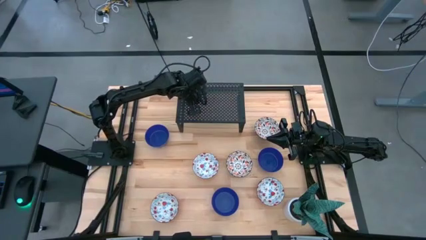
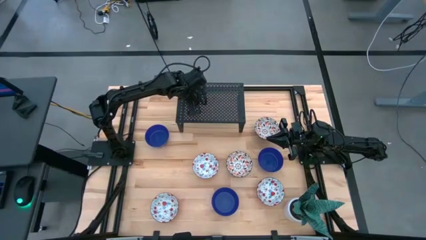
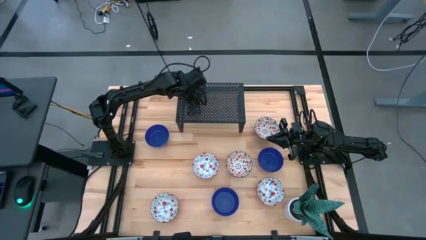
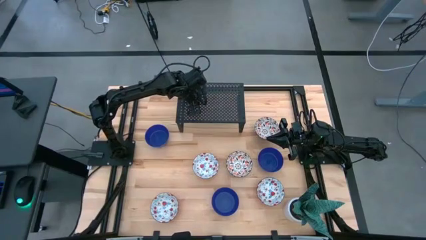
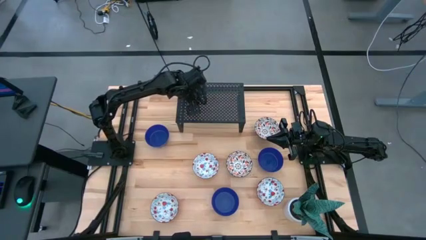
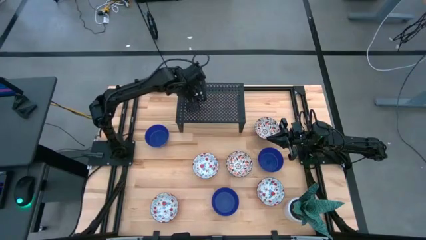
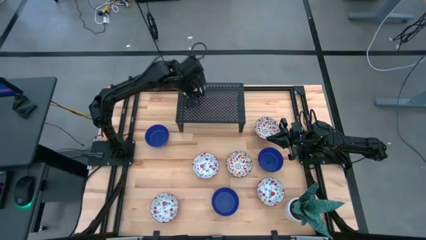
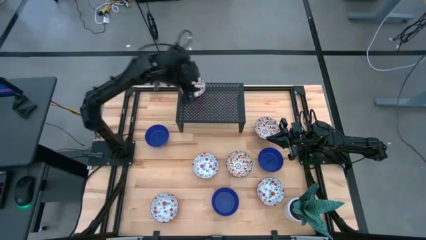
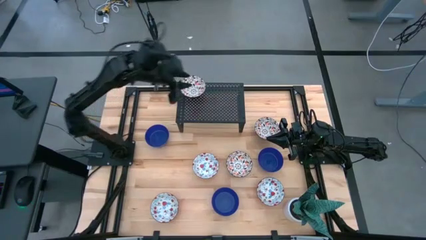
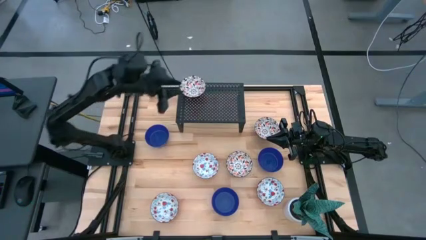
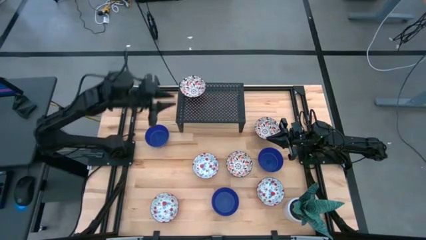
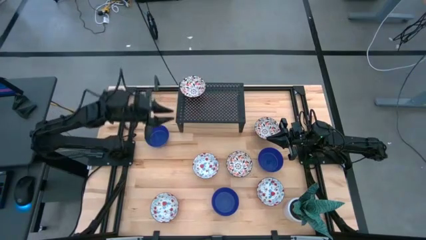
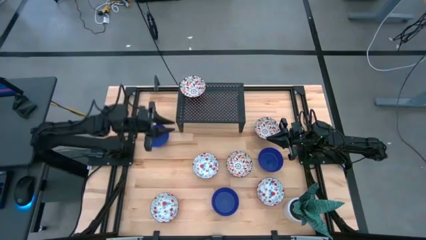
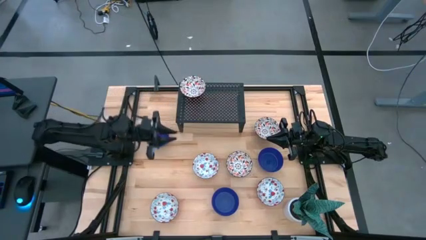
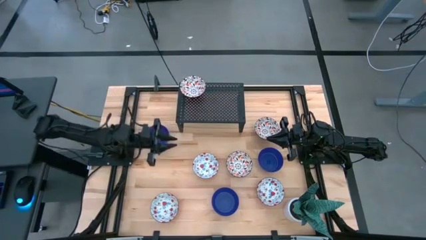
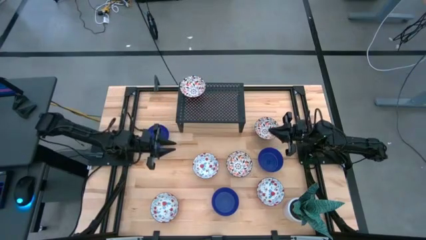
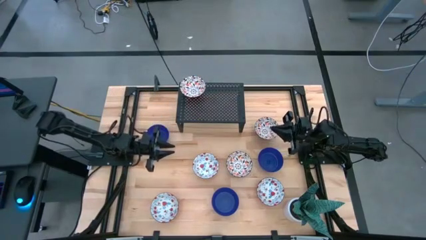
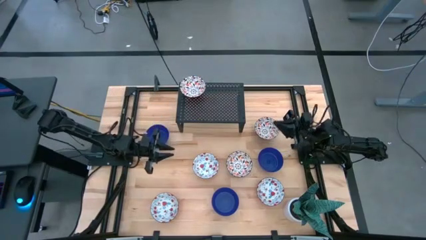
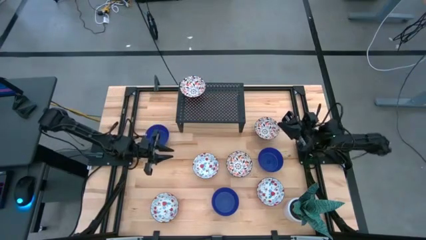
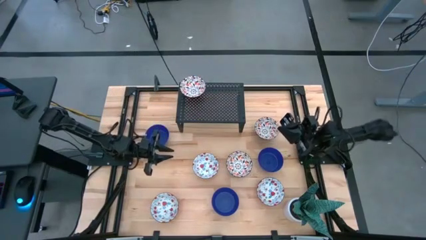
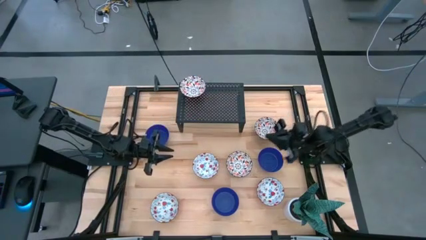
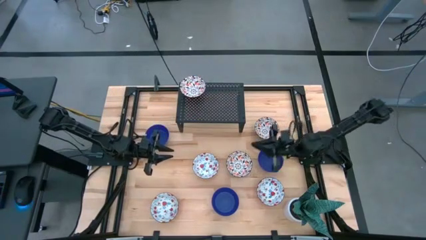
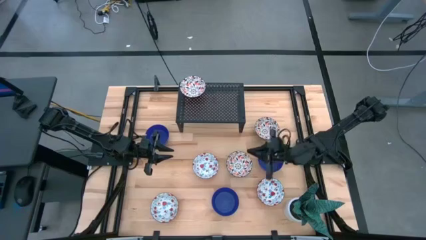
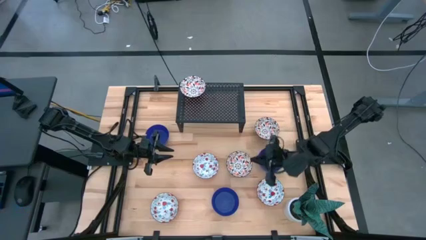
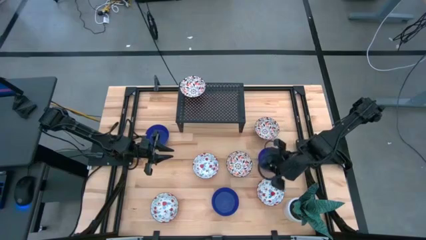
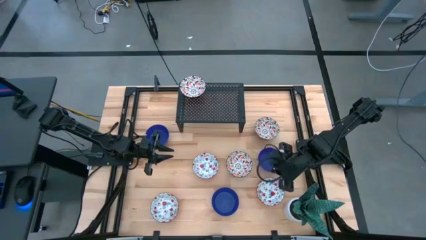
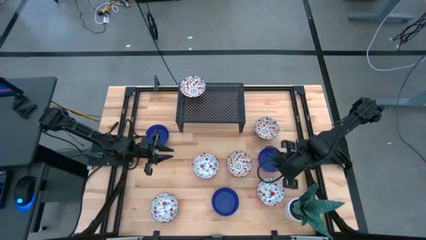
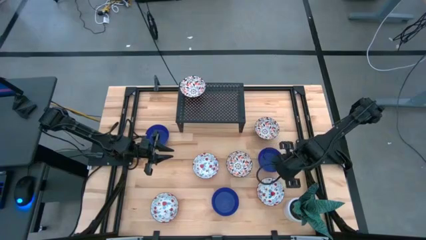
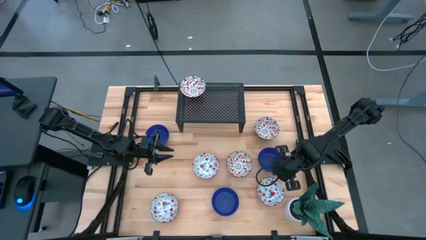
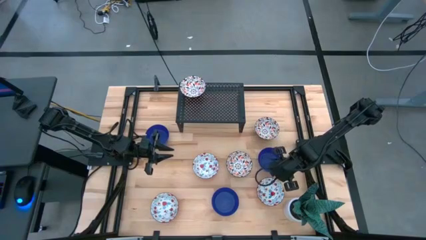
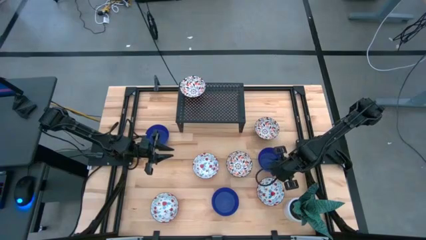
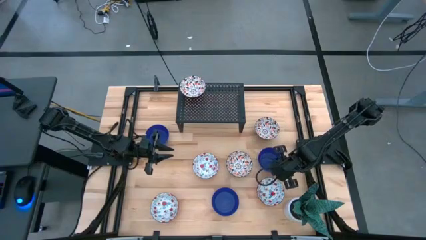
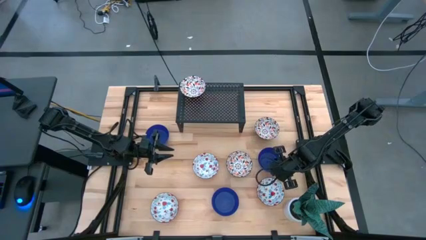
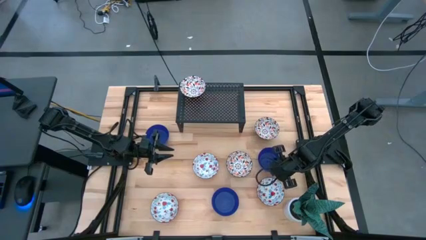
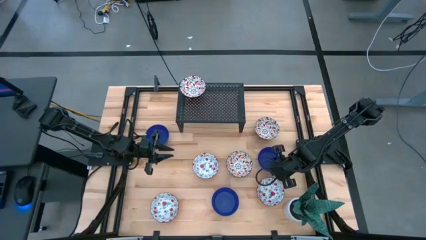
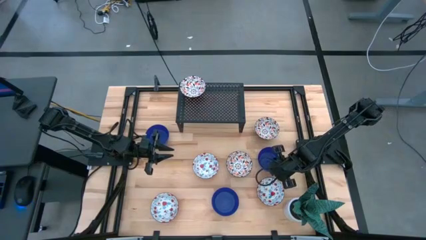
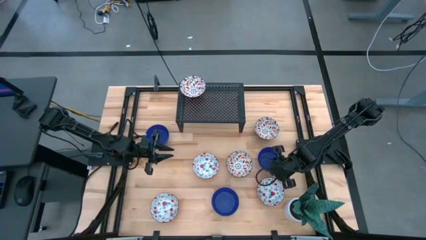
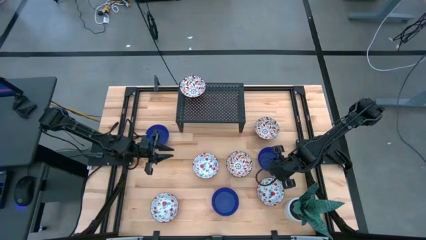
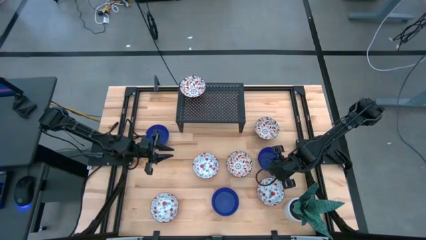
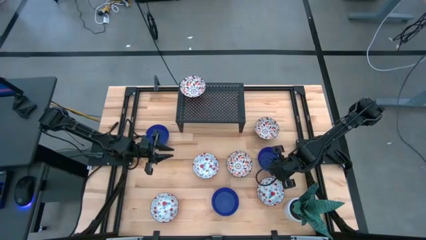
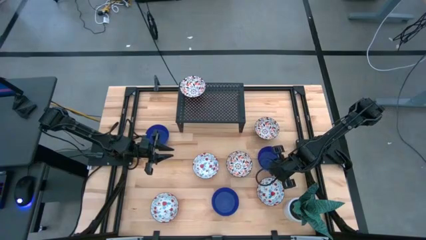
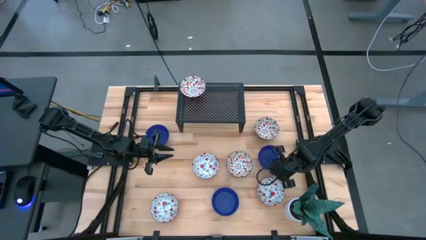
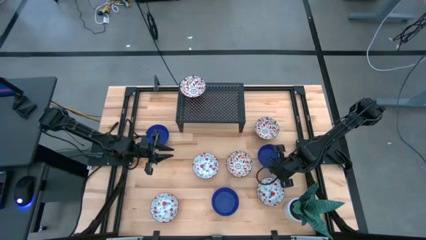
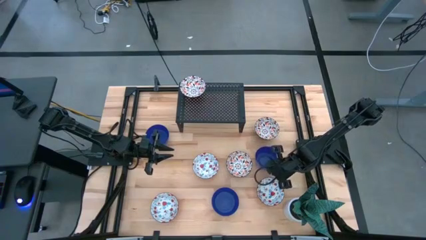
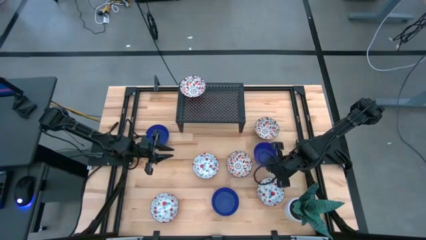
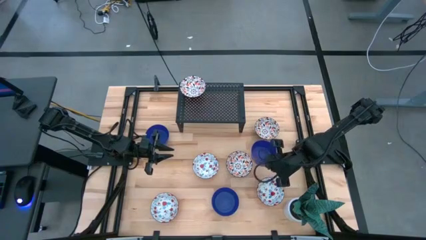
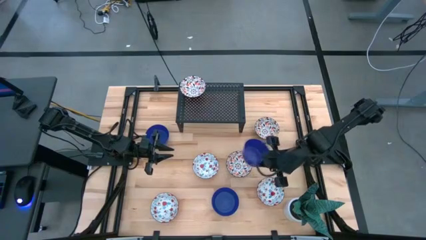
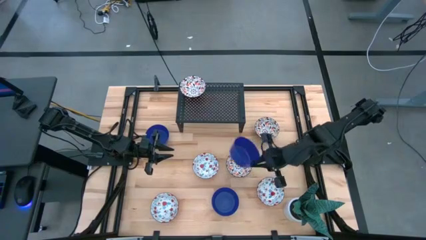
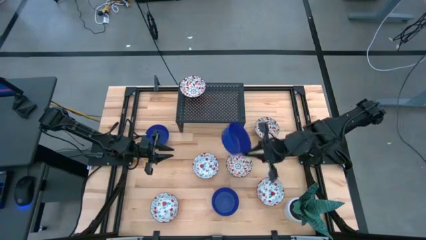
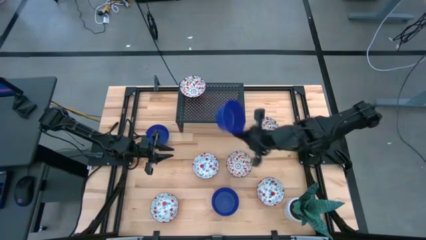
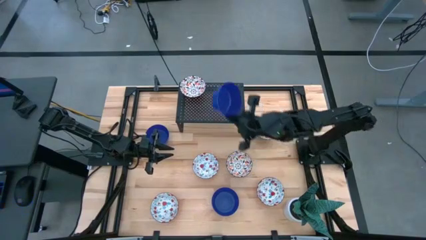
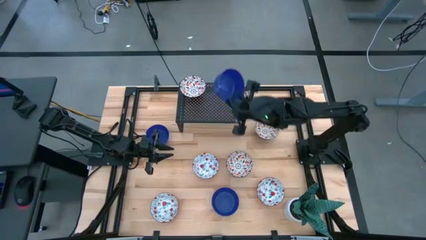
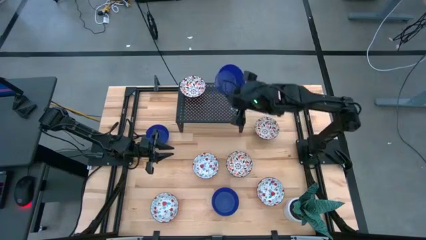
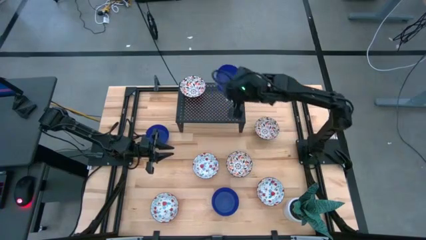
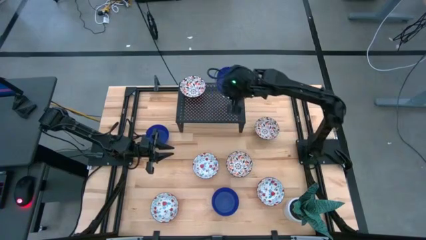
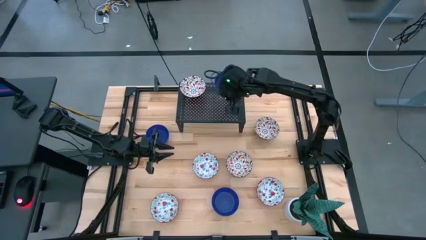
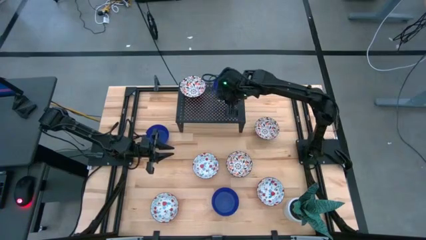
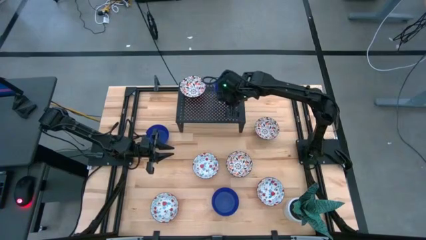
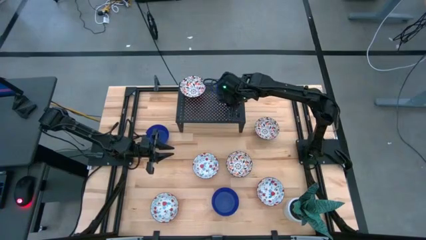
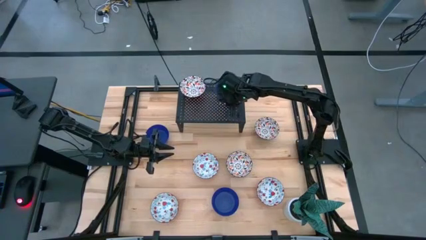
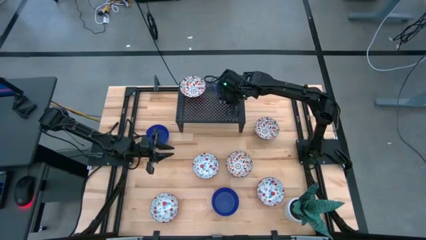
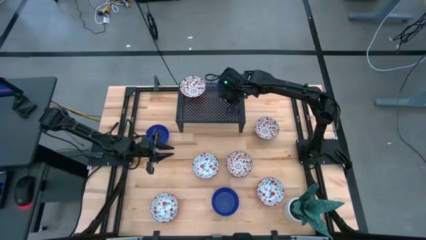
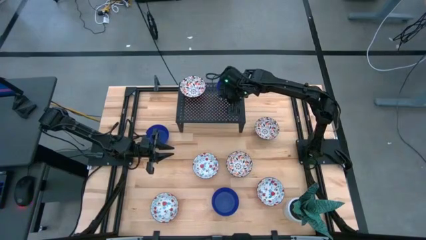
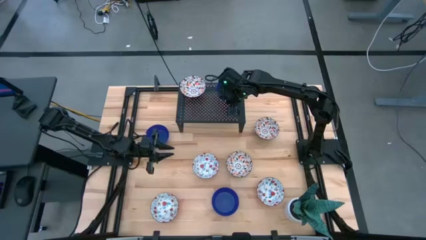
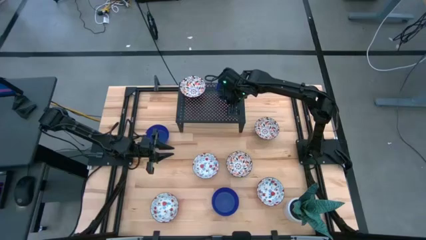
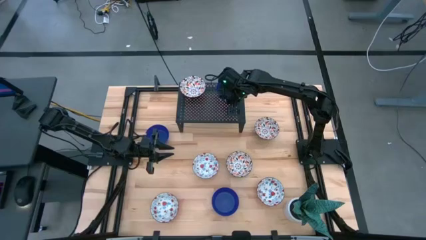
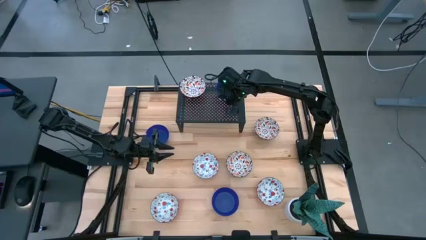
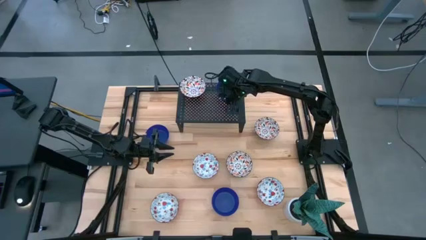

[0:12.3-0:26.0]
Task: Pick & Place Mini bowls
Put the right blue bowl on the shelf

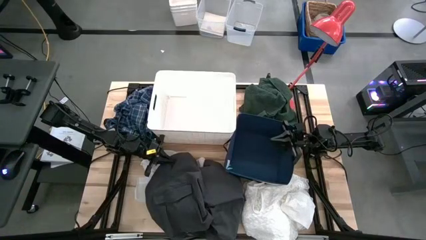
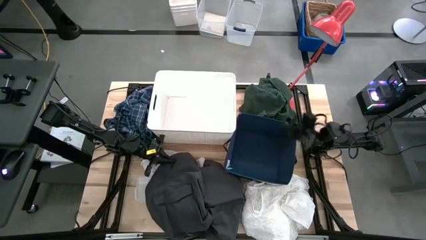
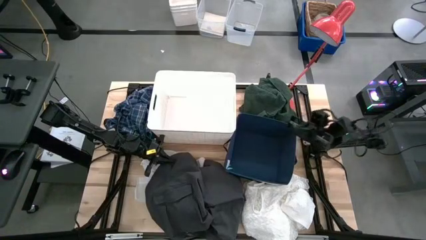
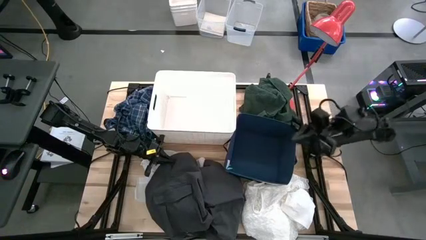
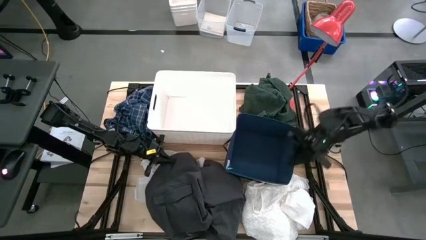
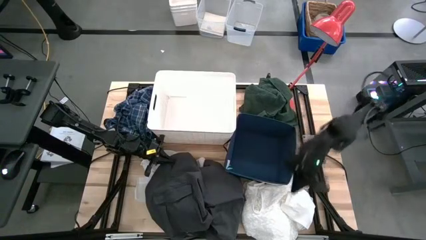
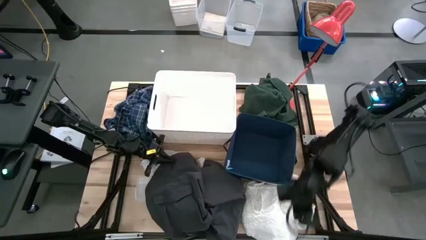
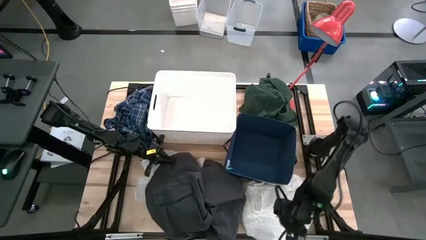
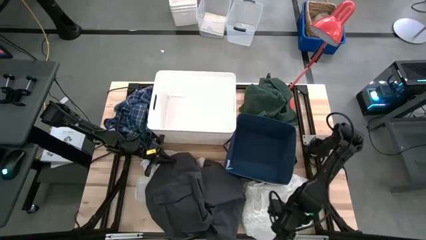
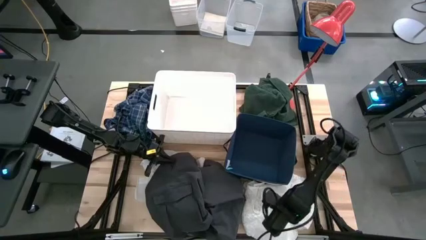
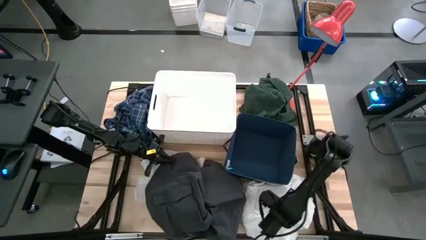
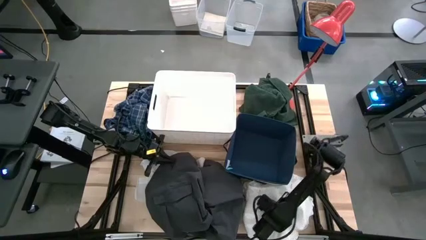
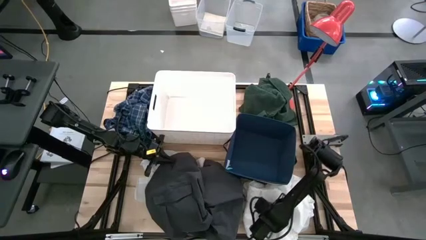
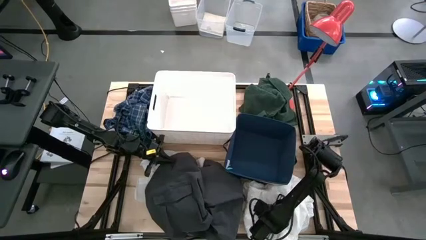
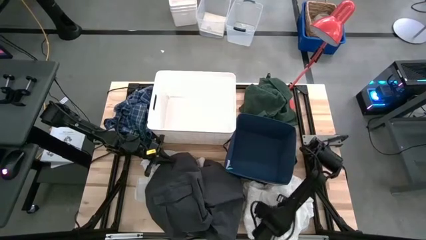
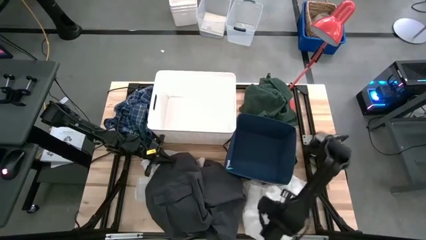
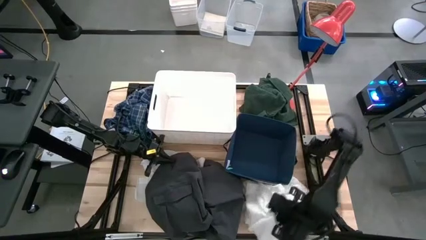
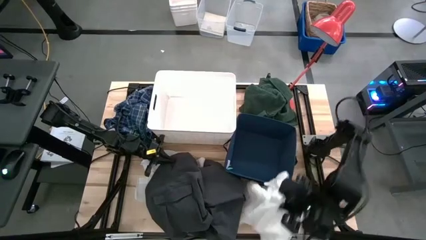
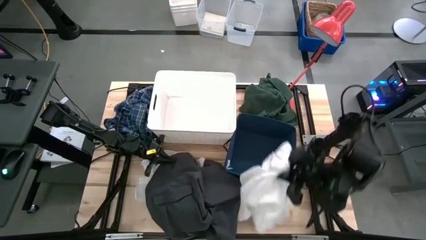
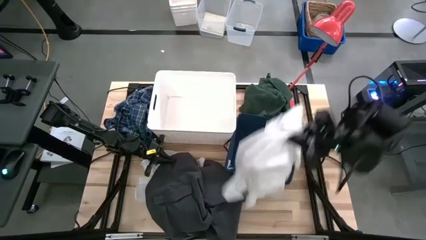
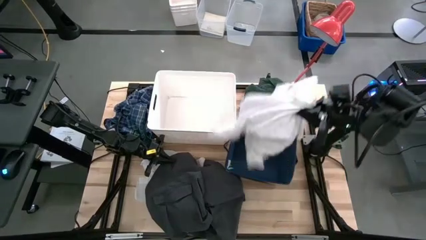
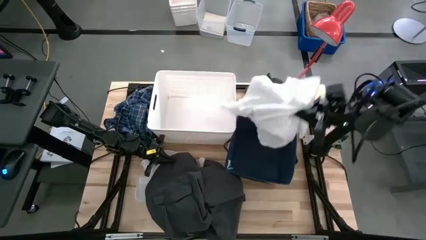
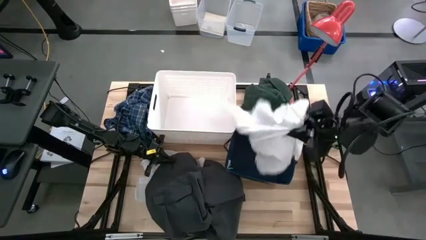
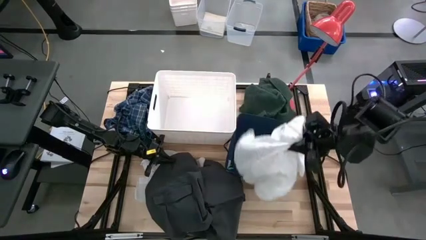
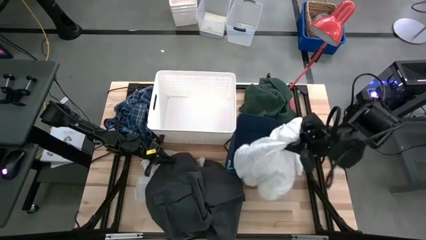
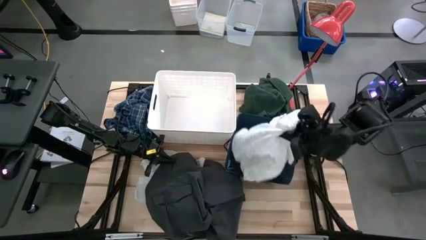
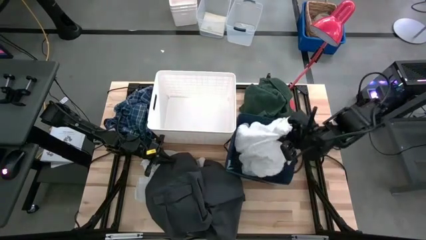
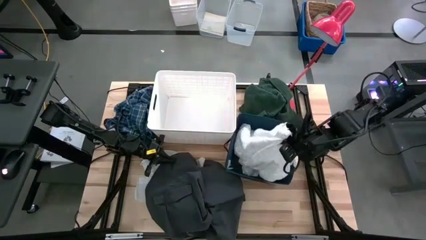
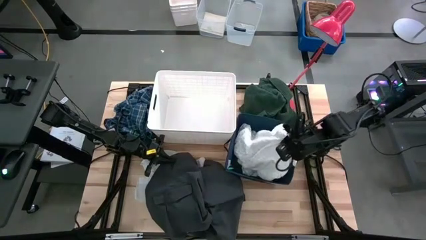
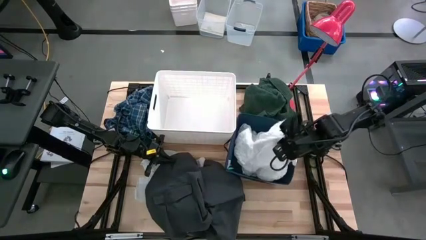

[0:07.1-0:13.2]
Task: Sort clothes
Put the right white shirt into the blue bin
